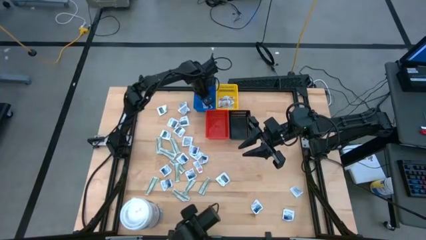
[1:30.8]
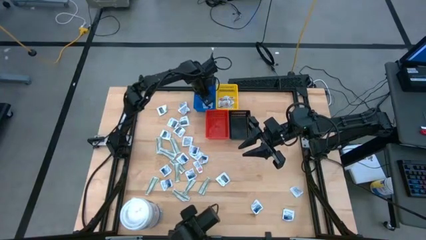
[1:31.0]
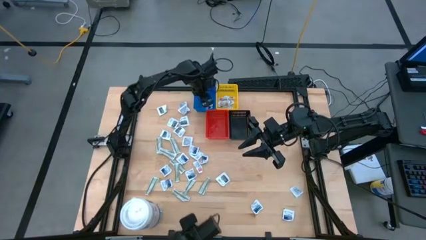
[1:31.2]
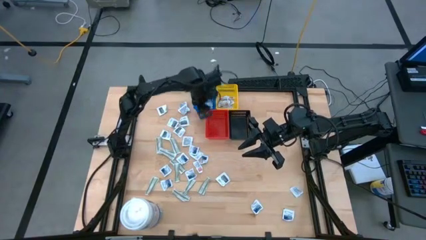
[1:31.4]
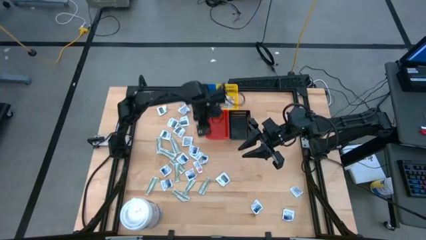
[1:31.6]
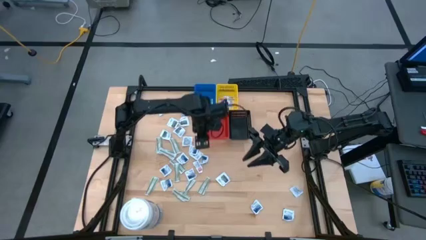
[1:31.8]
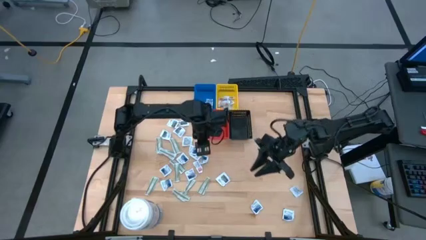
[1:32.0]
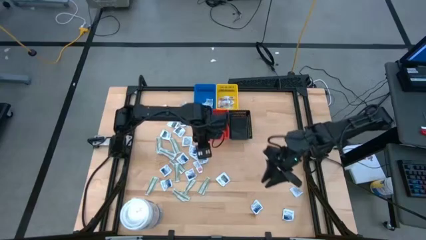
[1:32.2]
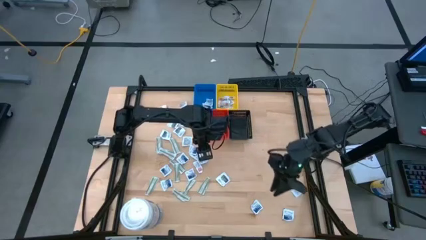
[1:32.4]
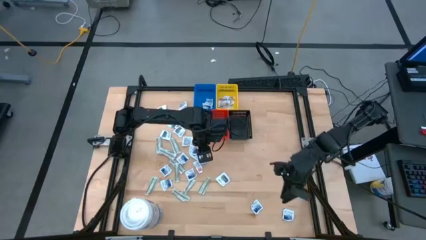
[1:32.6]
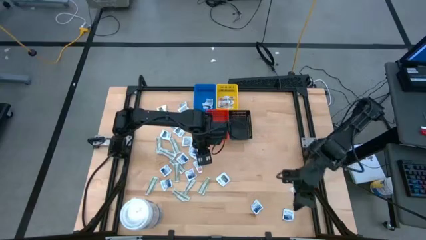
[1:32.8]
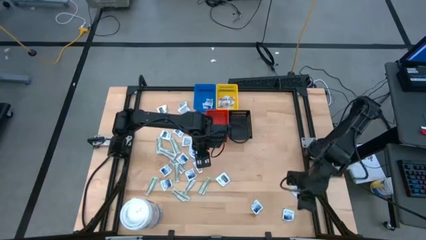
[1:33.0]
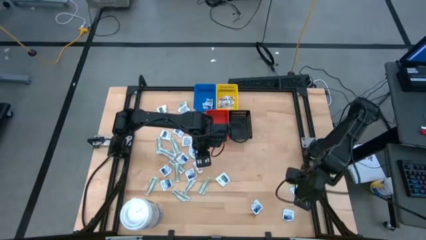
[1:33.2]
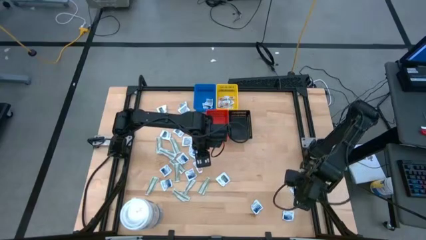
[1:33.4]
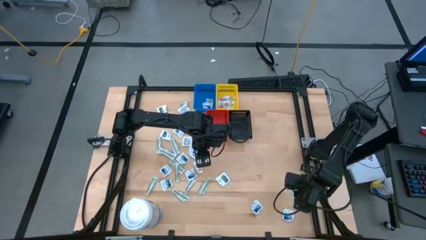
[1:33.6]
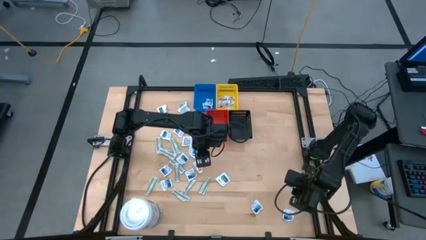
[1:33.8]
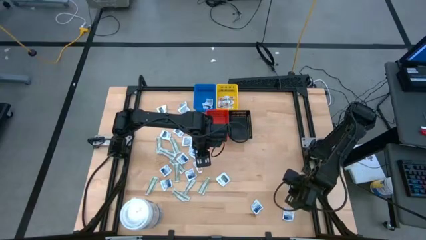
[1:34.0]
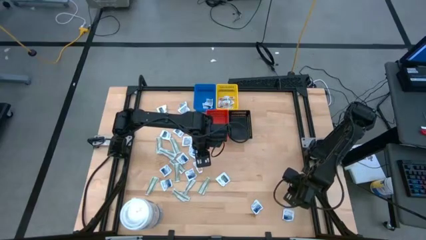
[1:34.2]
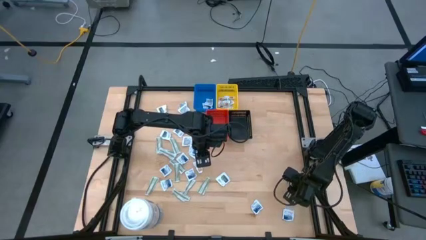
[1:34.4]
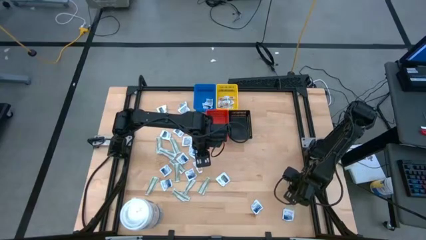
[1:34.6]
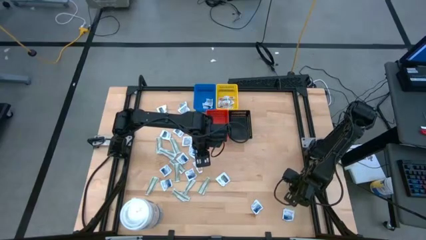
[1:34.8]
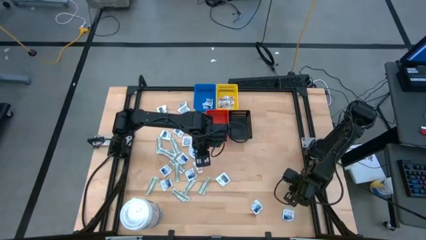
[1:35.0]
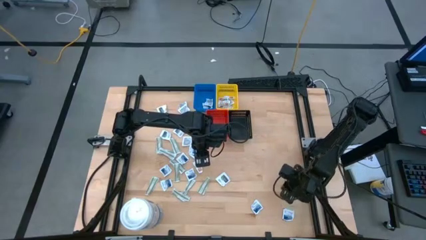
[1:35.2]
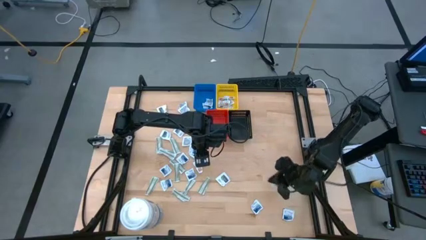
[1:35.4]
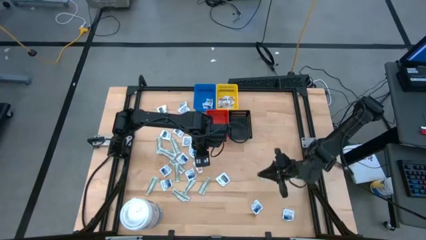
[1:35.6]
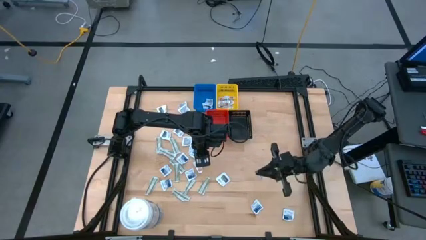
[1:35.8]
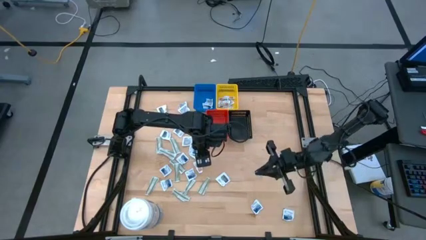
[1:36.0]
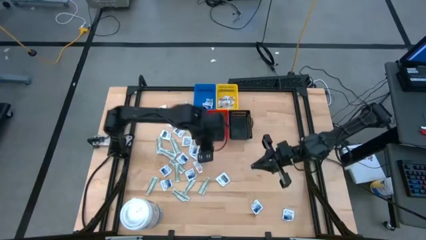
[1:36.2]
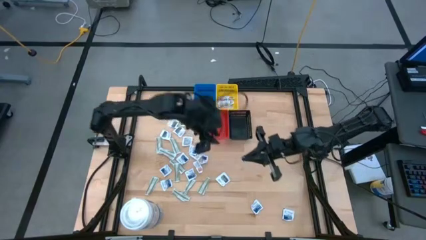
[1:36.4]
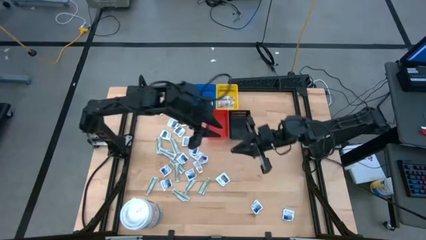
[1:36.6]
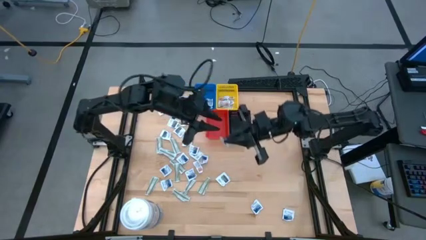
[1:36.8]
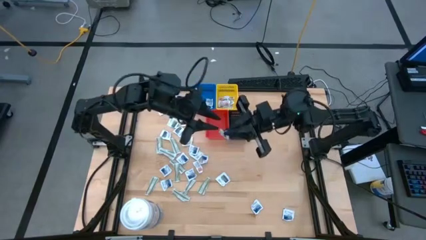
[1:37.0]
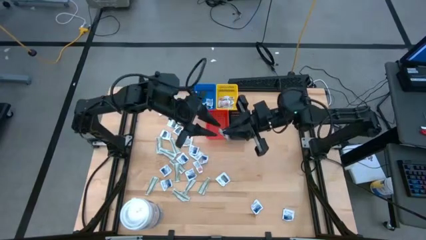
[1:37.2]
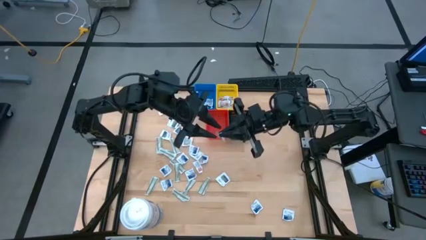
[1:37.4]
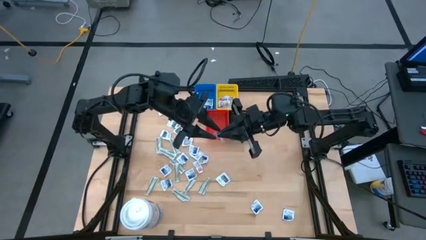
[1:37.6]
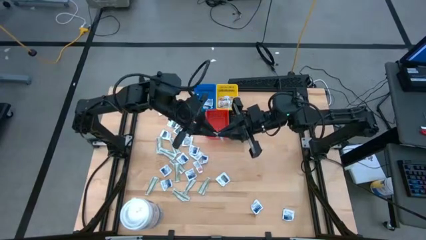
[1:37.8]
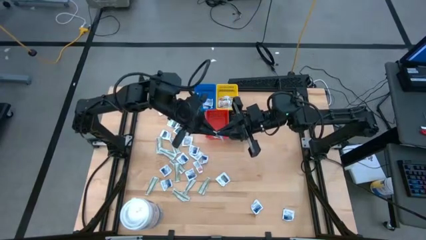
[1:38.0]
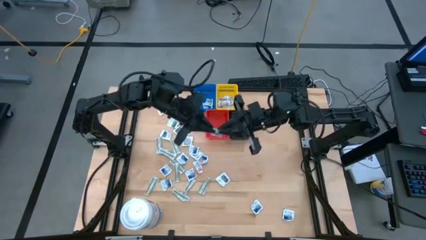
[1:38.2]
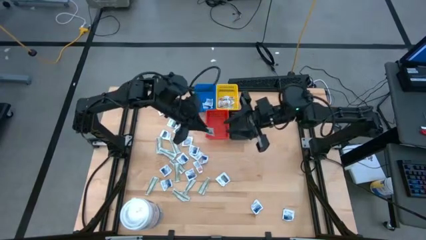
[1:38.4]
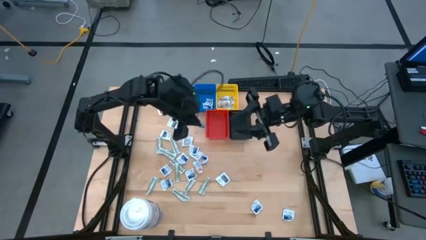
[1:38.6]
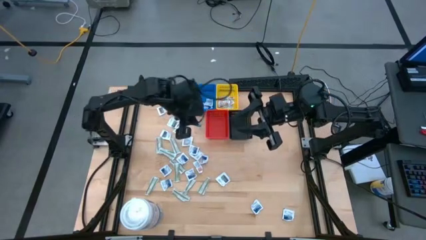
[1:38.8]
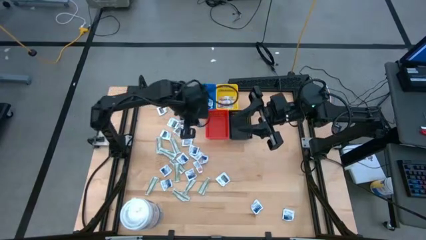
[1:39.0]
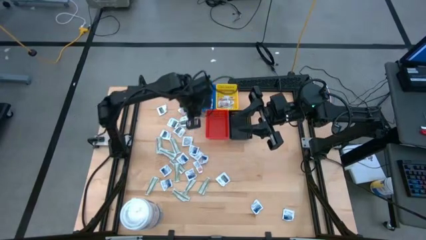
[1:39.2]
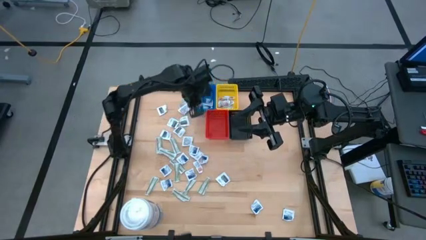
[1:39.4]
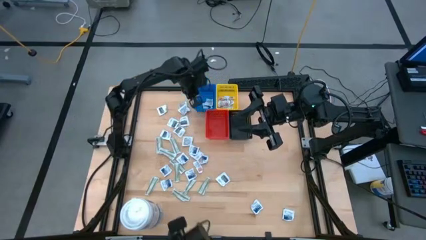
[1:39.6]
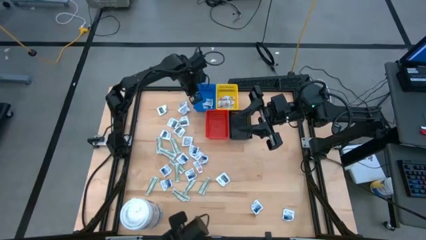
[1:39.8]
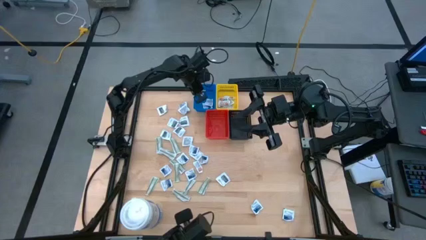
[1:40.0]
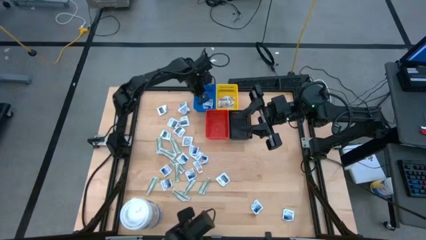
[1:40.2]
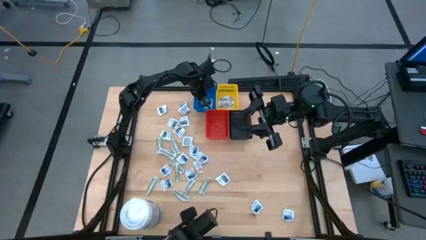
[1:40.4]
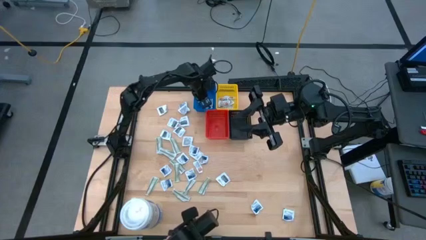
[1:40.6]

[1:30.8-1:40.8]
Task: Pick & Place First Aid Supplies
Put the alcohol pad into the blue bin
